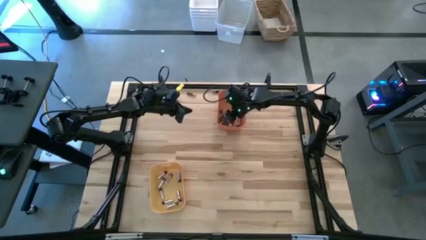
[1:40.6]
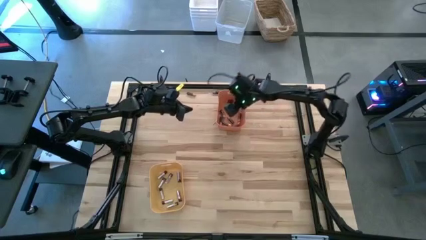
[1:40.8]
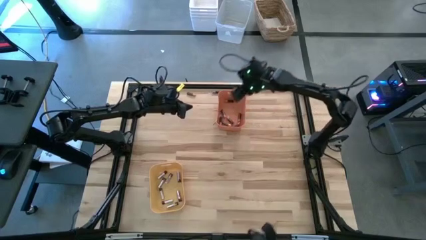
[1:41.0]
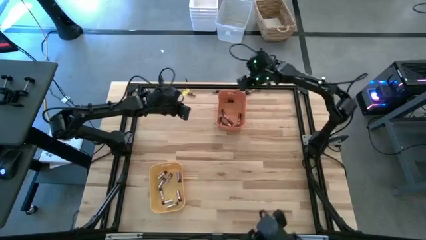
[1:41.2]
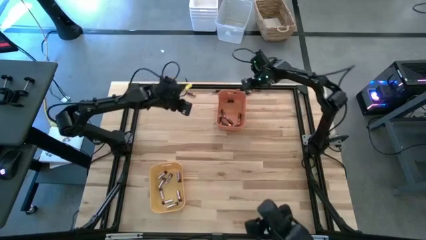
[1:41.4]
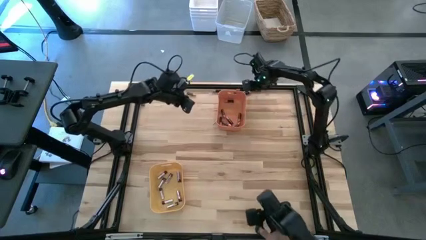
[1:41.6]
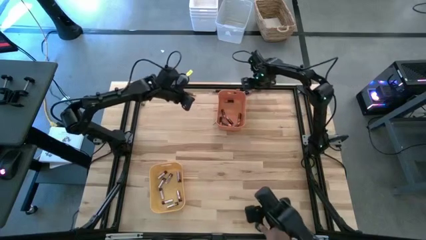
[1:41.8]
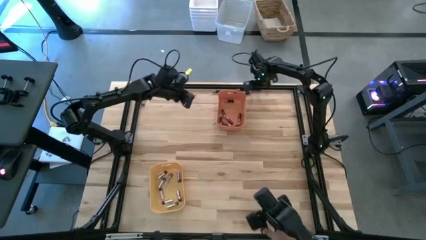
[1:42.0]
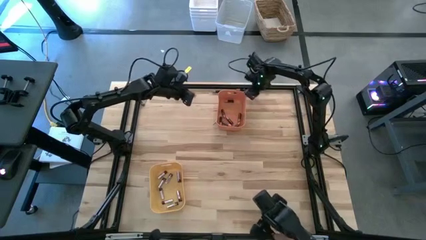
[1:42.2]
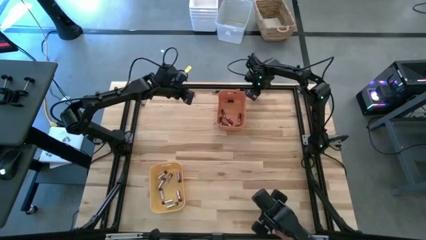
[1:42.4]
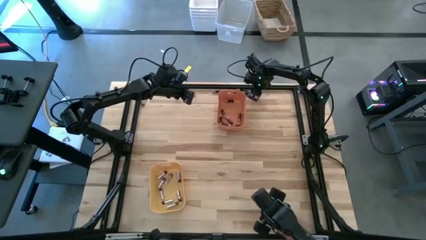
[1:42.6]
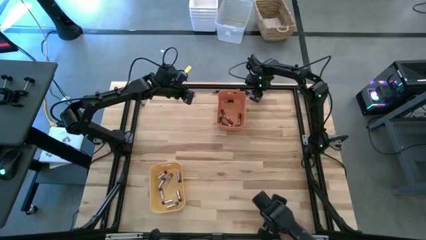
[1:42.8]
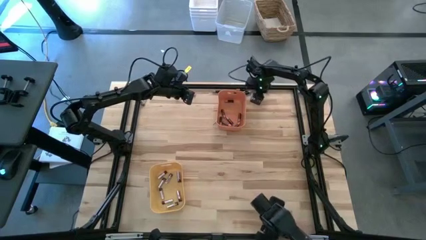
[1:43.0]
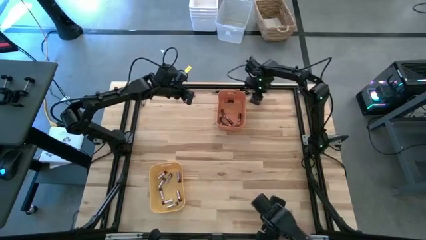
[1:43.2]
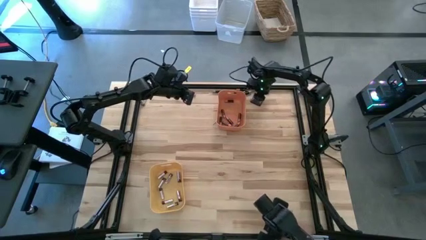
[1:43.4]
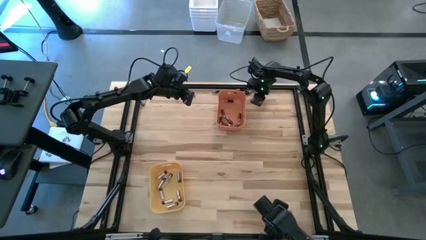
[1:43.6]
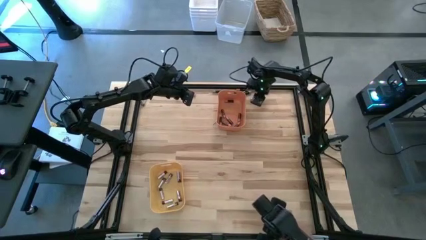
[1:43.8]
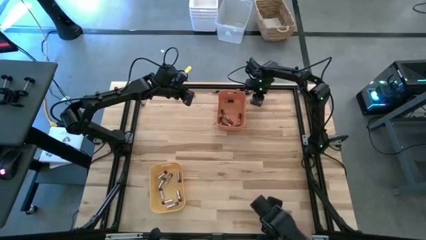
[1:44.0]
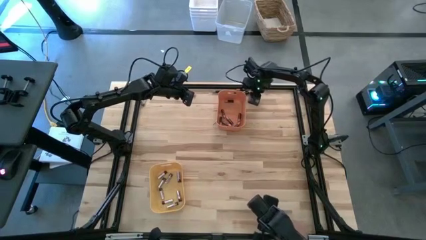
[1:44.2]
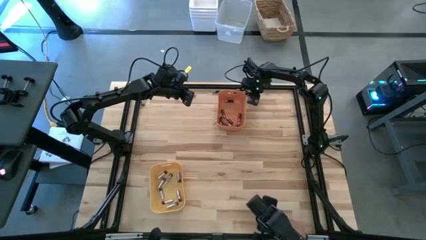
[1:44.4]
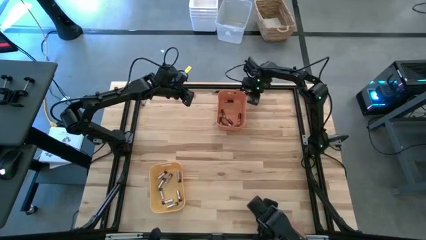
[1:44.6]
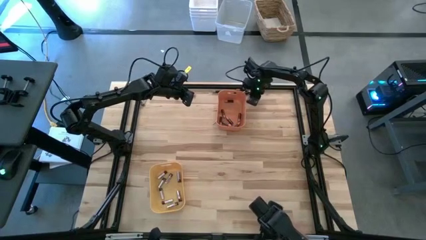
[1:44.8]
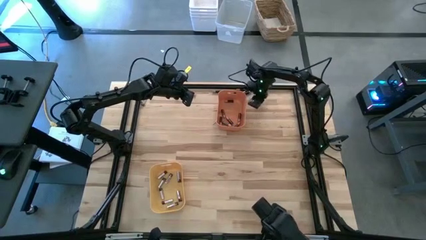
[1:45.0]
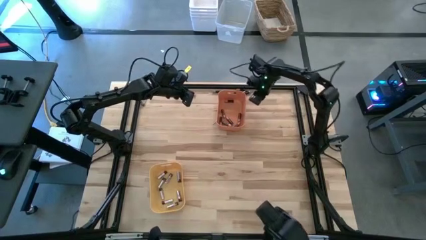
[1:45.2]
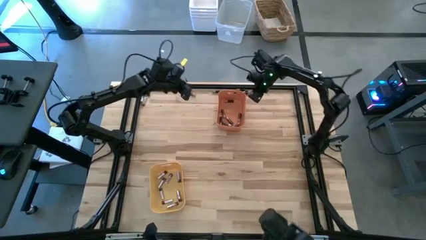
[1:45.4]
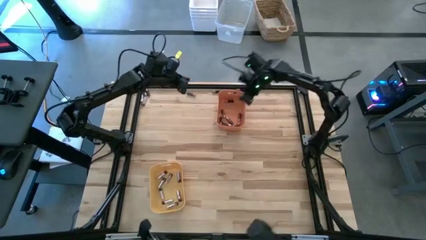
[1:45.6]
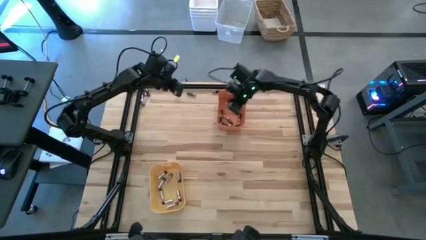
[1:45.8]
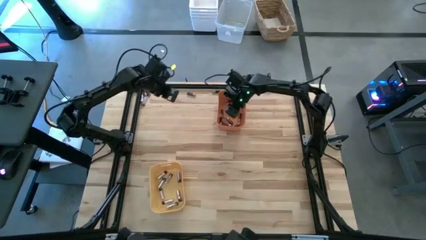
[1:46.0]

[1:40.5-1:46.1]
Task: Sort batteries
Put the black battery into the orange bin

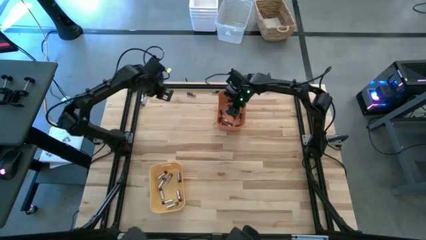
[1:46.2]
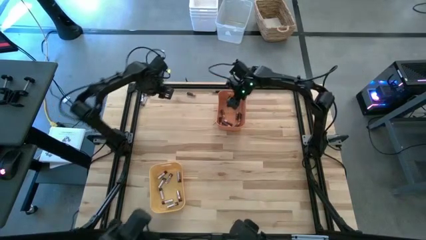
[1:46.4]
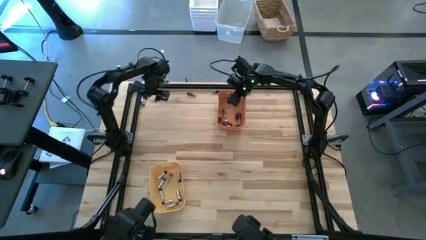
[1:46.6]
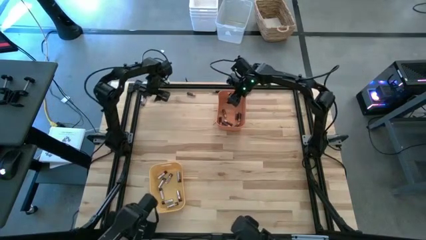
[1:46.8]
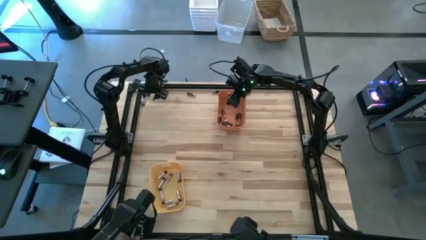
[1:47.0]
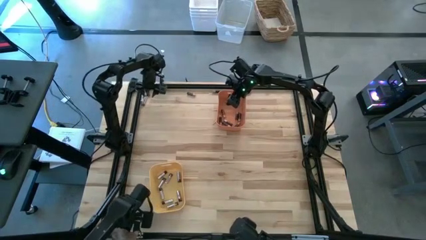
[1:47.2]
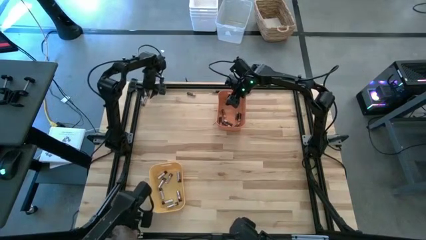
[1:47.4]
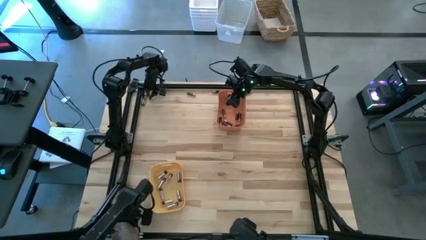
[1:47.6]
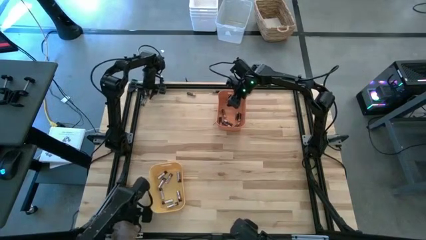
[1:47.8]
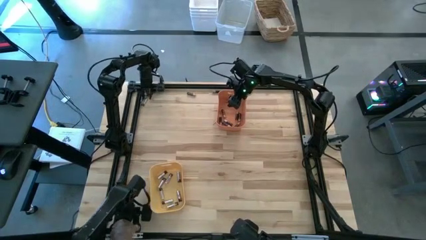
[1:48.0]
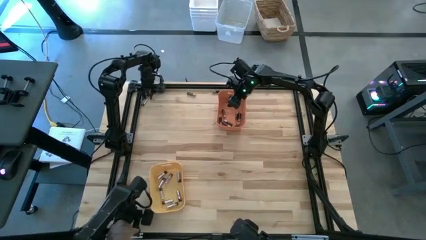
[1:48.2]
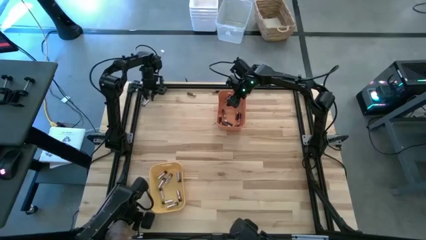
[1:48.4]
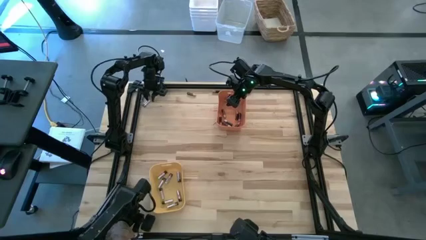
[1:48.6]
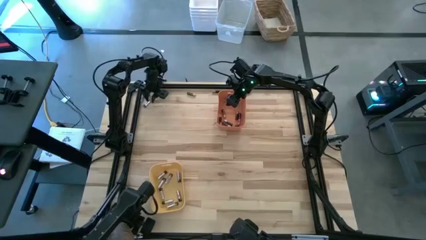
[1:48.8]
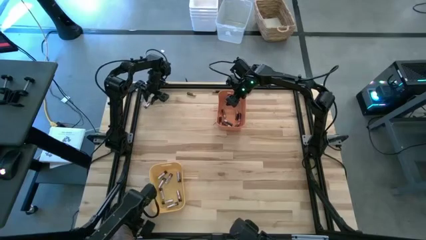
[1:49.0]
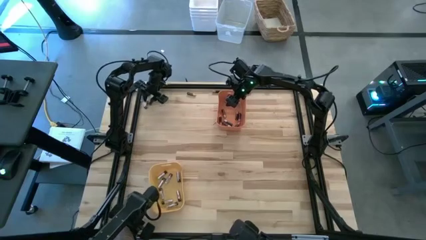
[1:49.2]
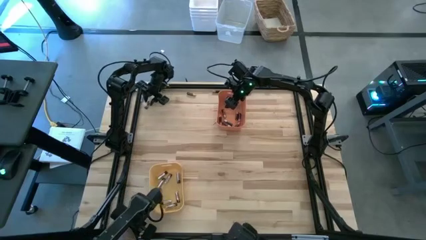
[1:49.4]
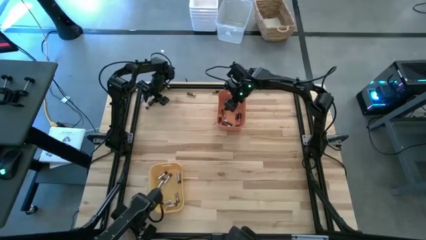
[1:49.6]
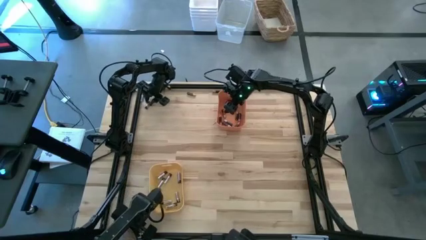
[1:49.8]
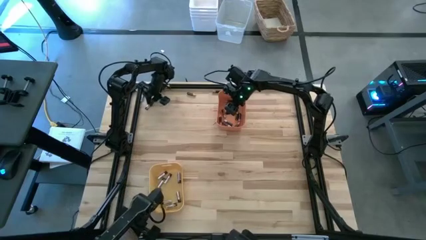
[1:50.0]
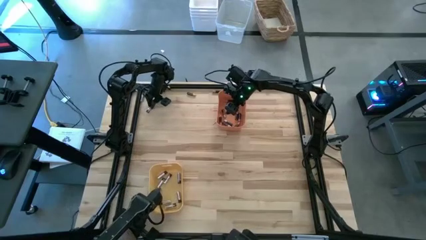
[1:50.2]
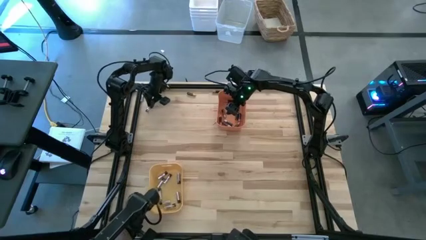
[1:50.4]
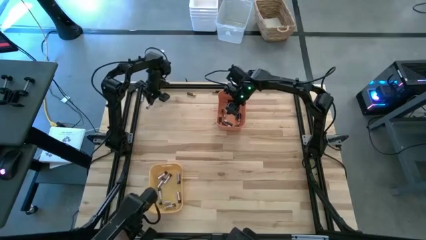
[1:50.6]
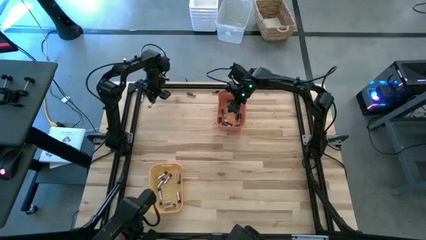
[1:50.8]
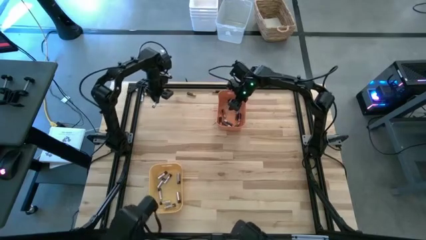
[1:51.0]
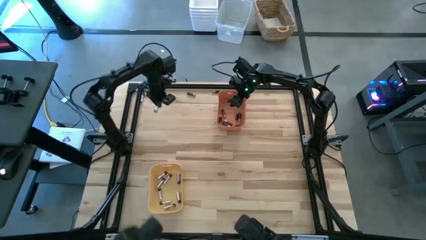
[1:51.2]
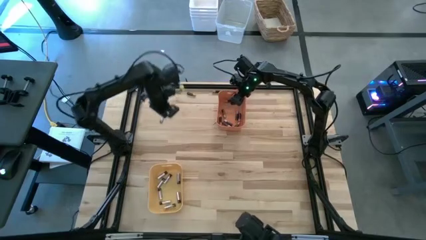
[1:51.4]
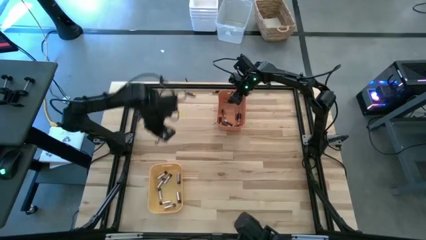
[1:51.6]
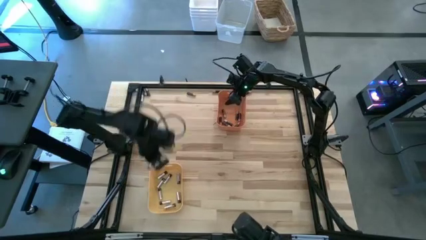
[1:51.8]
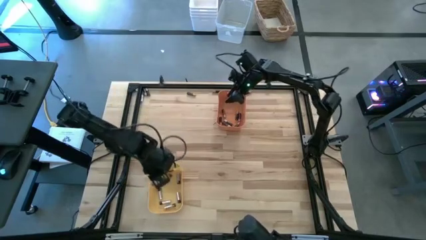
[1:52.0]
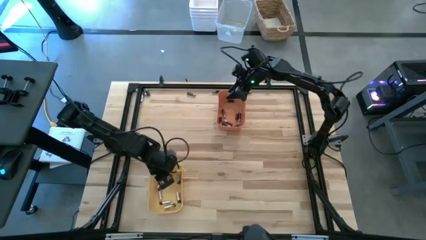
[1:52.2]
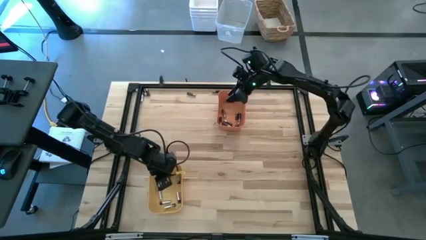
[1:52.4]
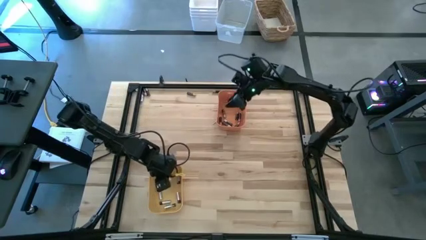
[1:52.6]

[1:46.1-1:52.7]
Put the silver battery into the yellow bin

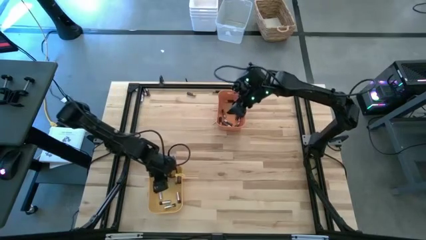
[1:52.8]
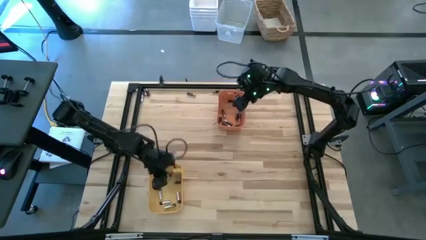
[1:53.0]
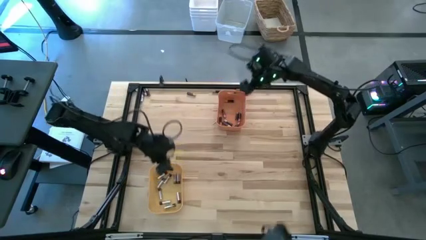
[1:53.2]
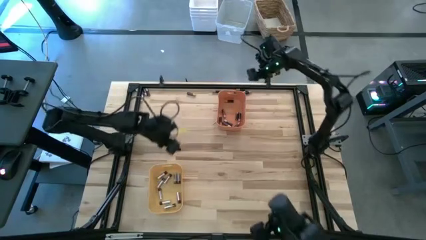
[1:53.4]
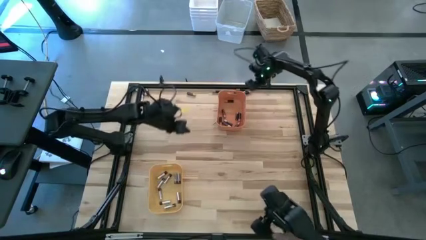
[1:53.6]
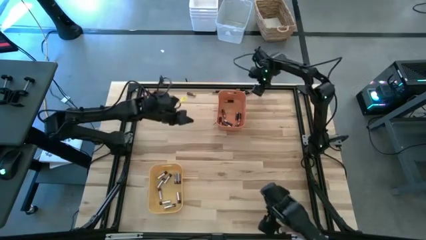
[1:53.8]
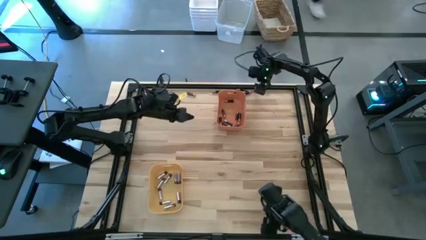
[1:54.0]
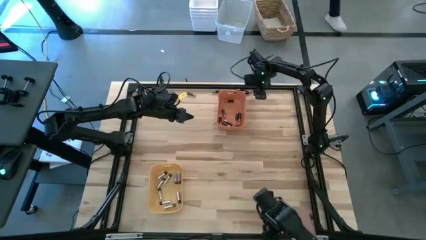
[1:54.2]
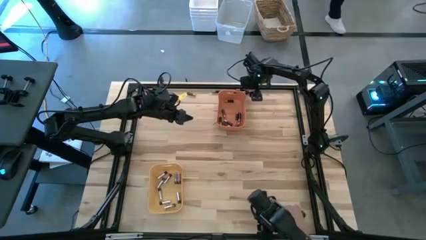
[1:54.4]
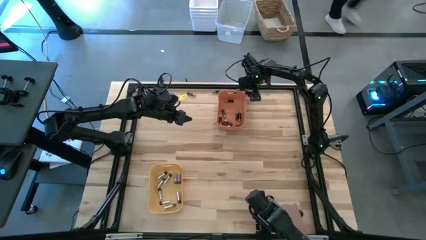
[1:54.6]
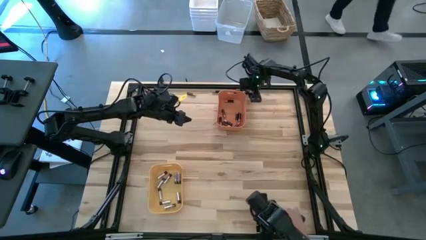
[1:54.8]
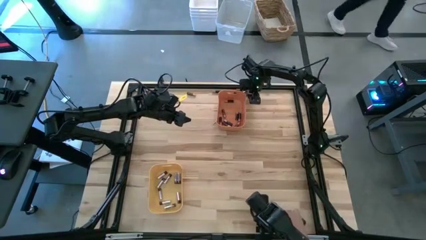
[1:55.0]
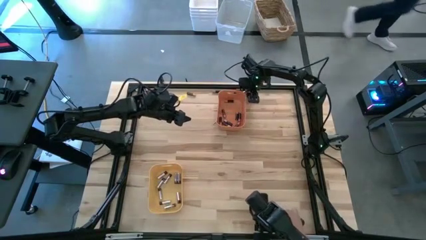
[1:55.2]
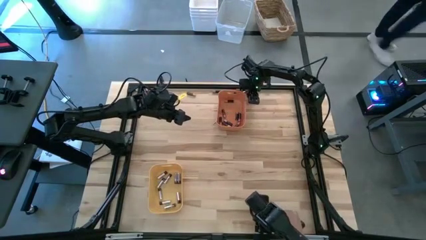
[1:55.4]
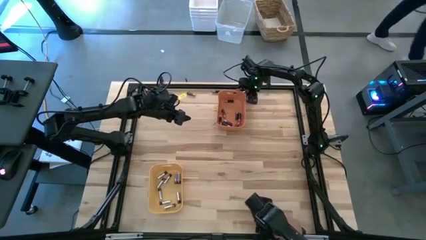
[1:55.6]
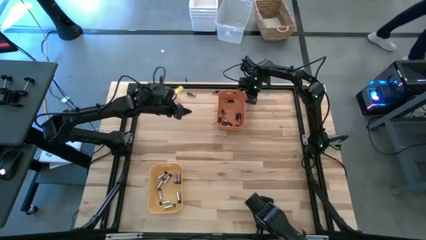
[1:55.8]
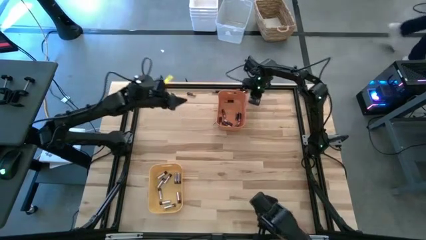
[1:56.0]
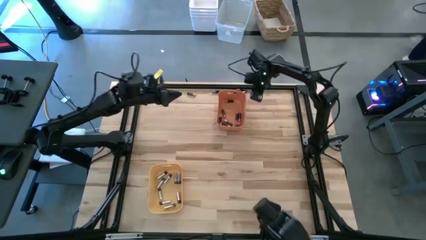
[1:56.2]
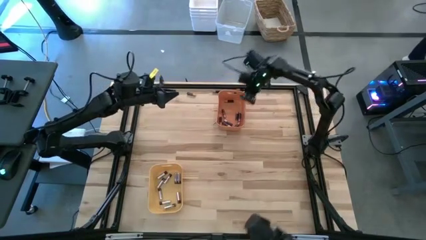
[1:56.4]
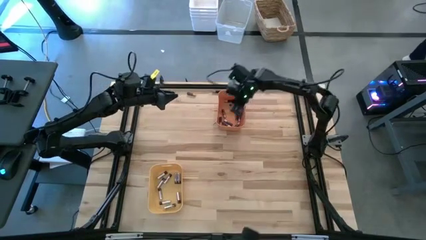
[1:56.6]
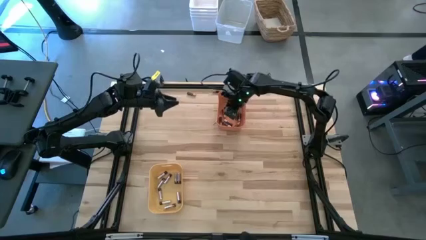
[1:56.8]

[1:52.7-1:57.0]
Put the black battery into the orange bin
